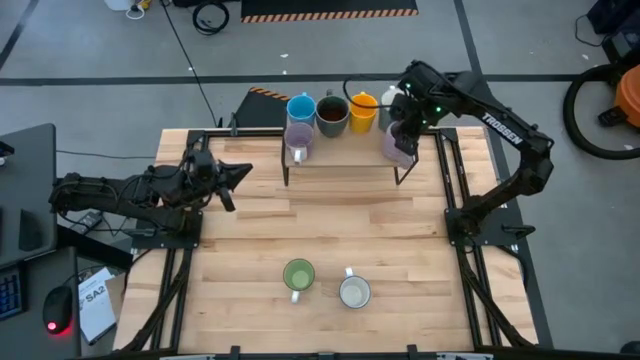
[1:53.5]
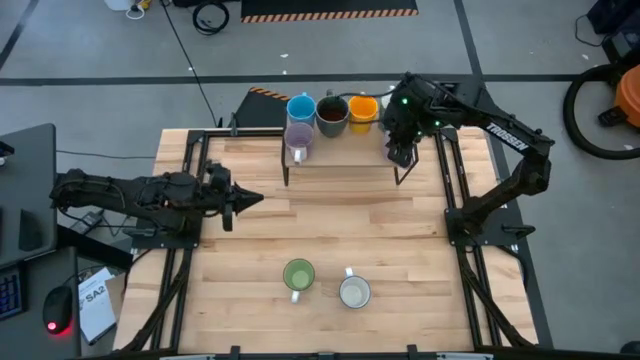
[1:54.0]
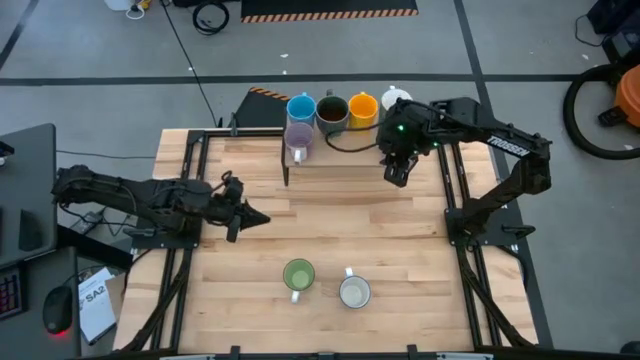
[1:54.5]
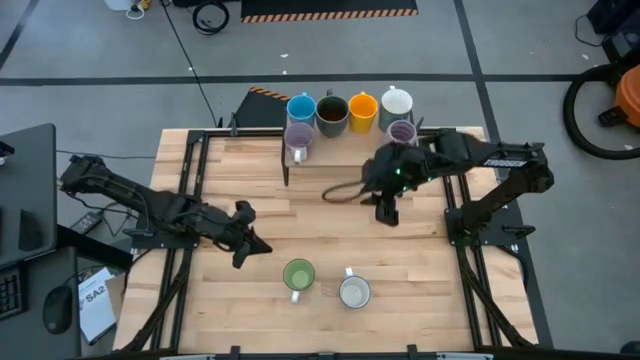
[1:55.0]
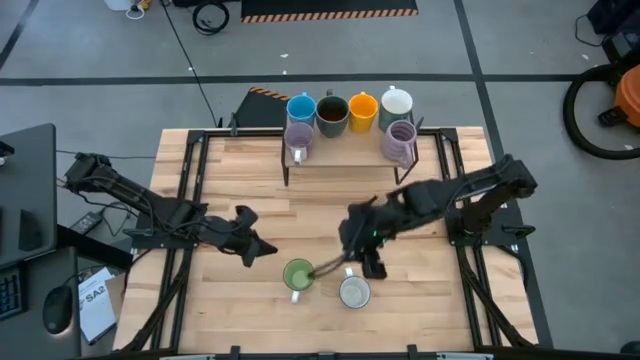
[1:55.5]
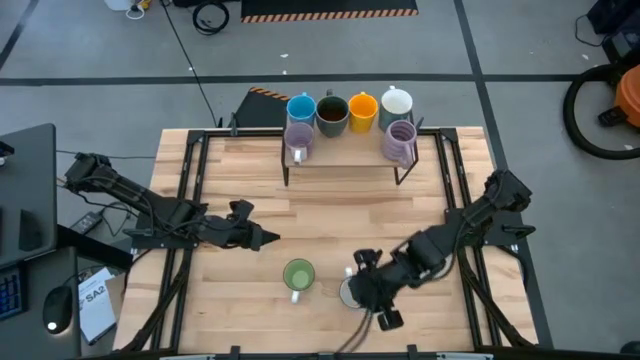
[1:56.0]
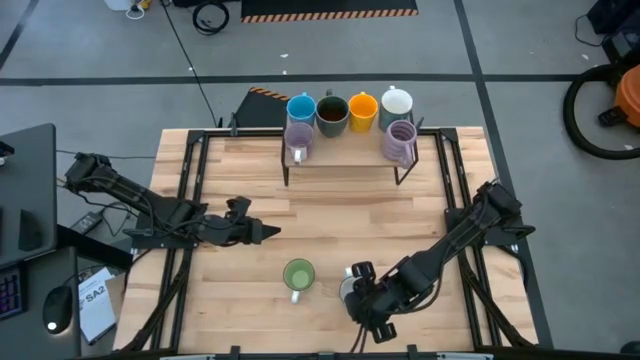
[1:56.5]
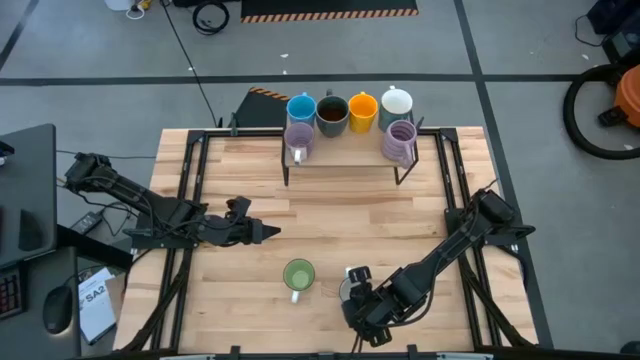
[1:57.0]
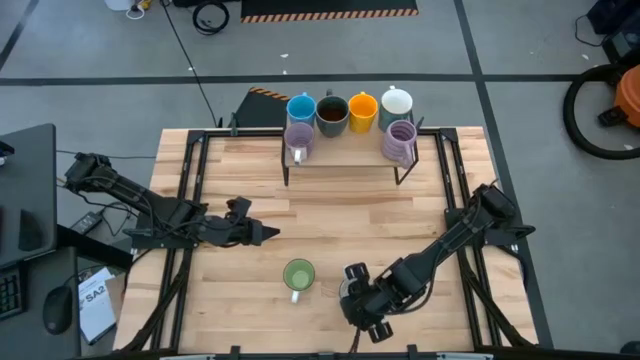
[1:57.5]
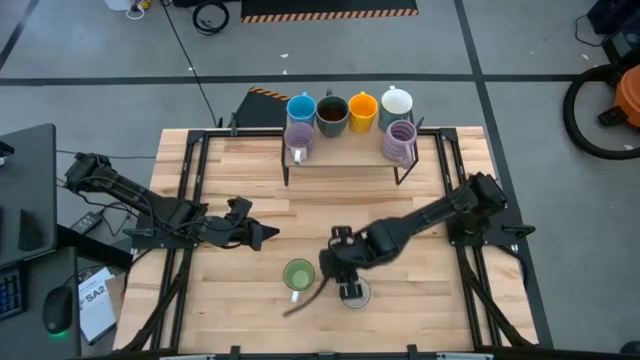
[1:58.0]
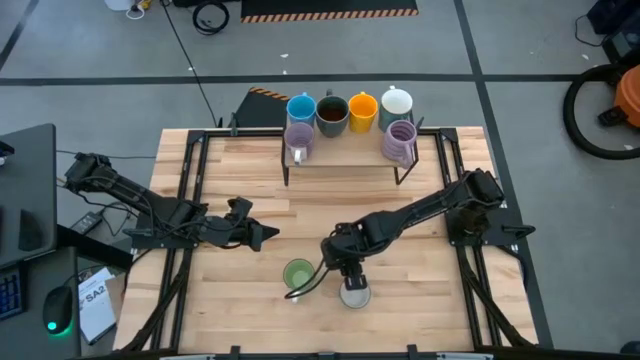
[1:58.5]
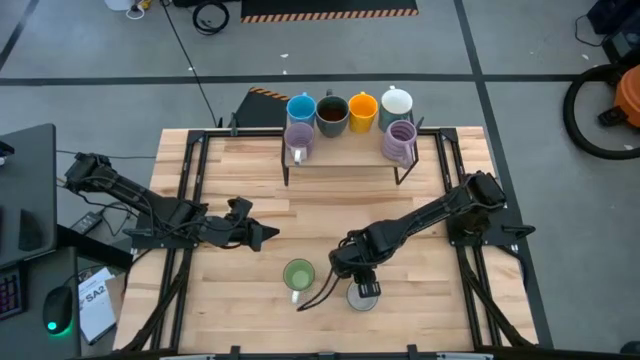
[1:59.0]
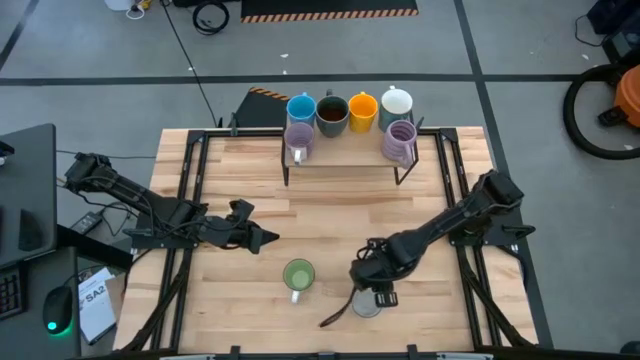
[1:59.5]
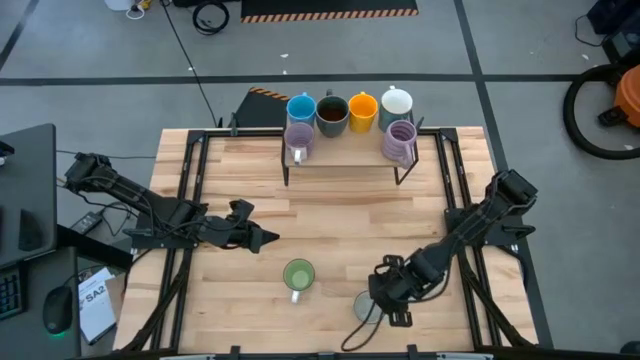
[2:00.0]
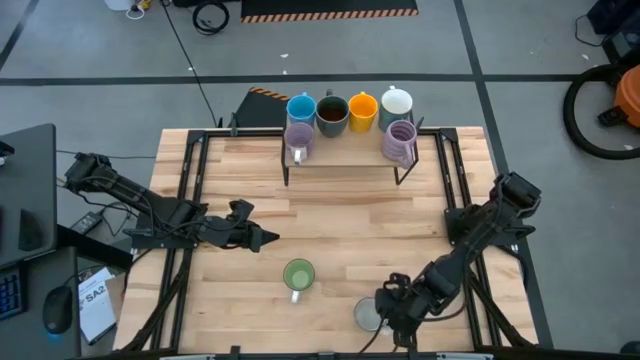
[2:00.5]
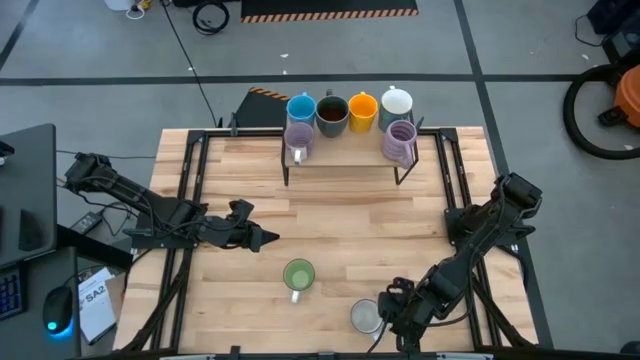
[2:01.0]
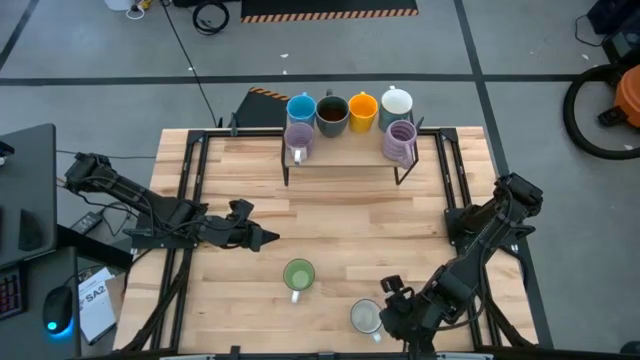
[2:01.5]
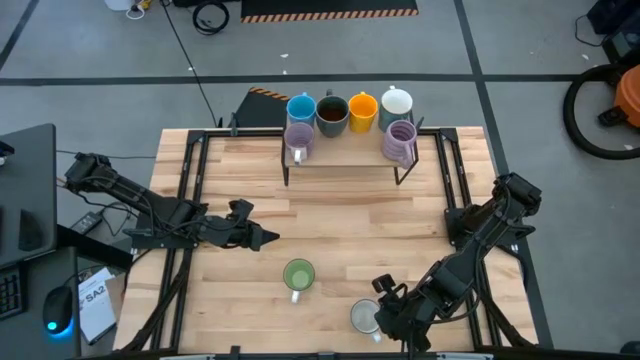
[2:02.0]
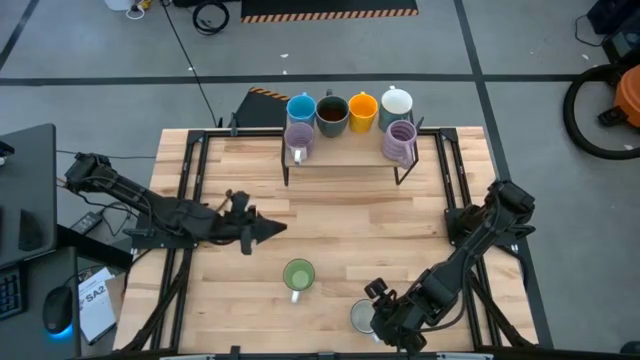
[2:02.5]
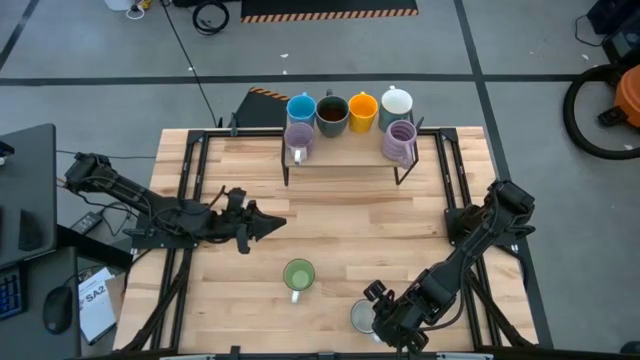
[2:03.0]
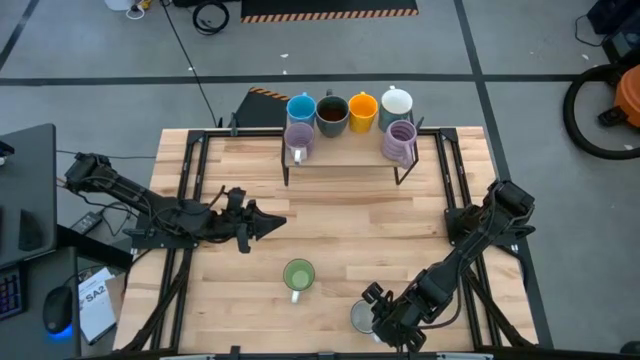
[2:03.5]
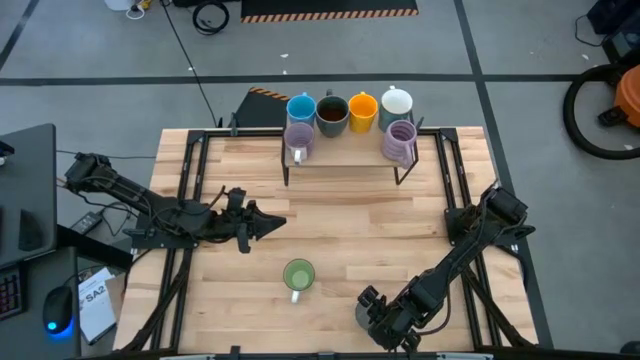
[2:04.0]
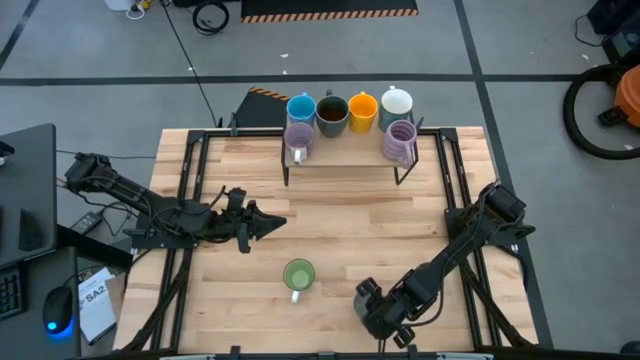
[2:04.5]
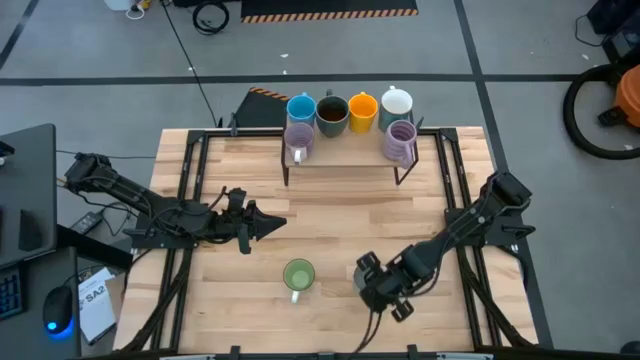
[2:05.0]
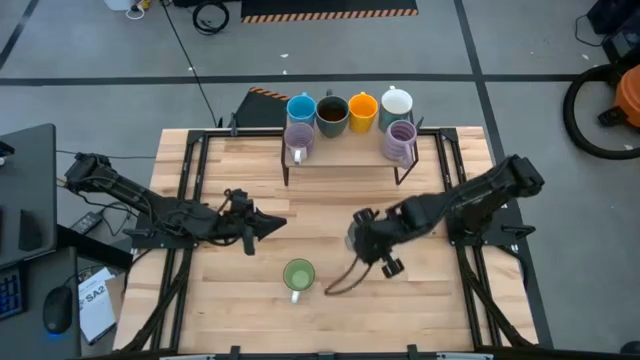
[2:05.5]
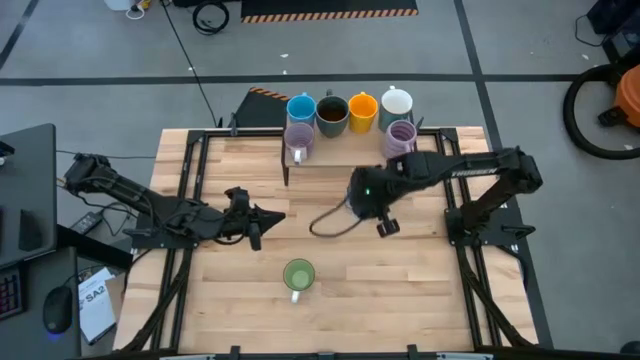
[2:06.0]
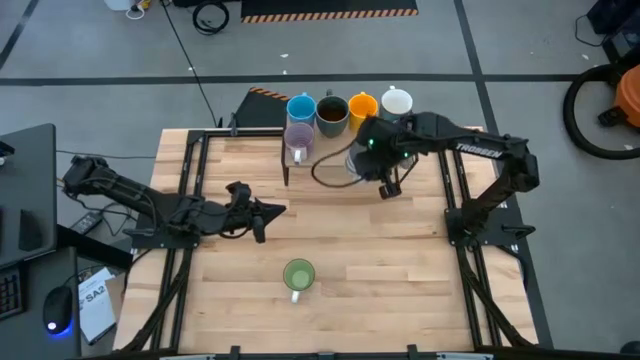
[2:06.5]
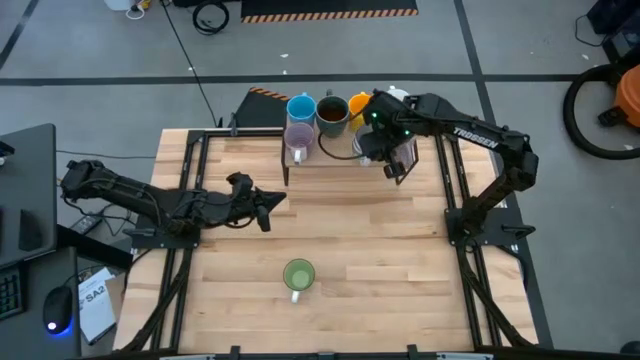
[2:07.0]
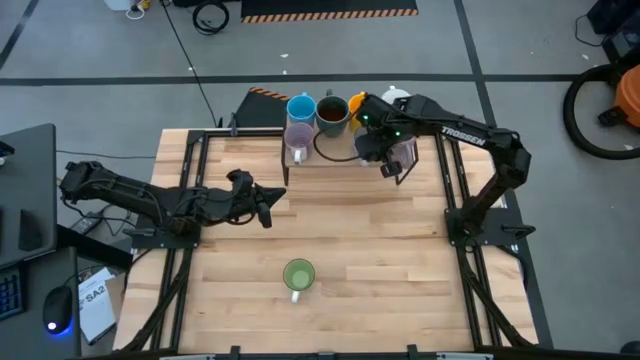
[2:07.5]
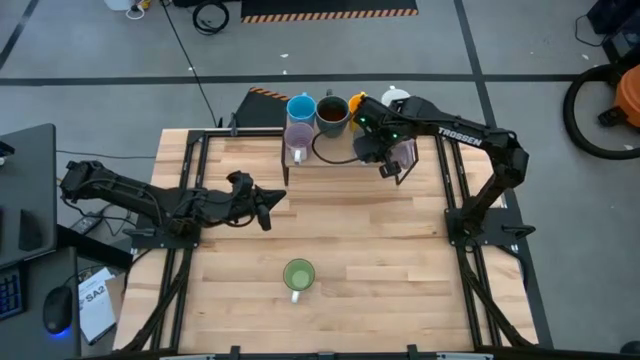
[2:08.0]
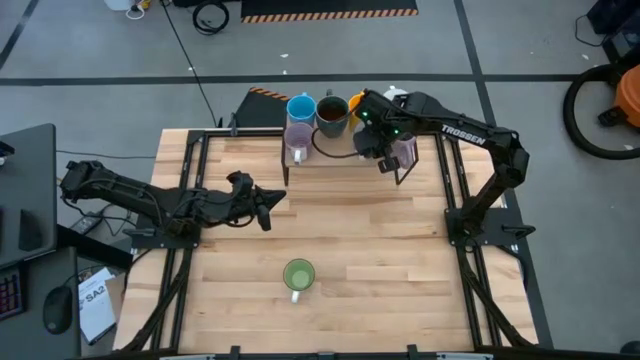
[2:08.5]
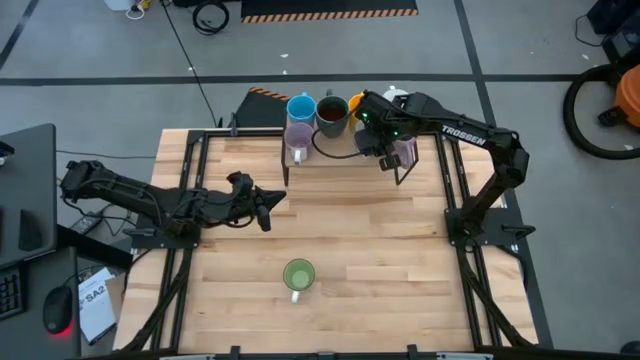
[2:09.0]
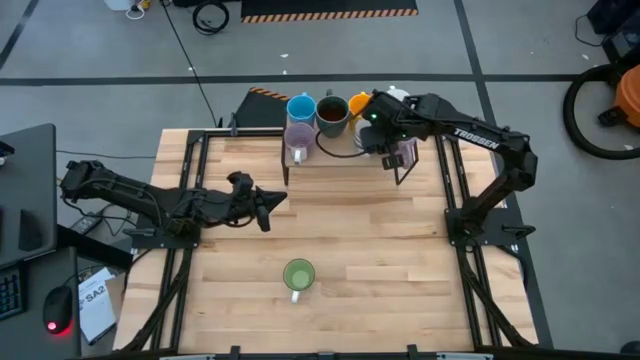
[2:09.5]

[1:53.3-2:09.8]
Task: Place coffee mugs
Put the white mug on the shelf

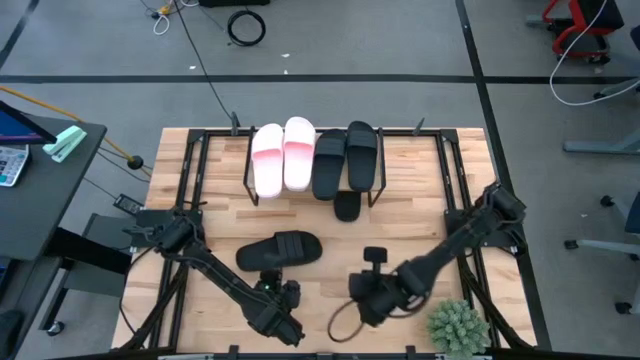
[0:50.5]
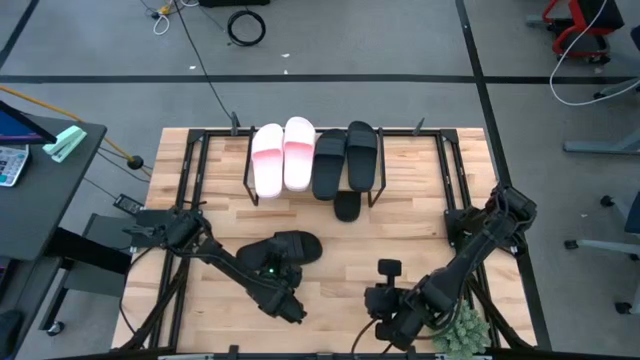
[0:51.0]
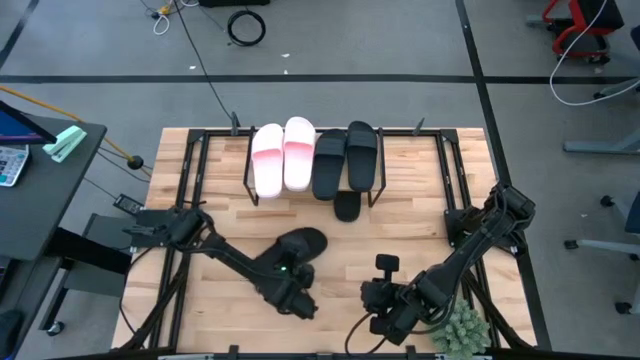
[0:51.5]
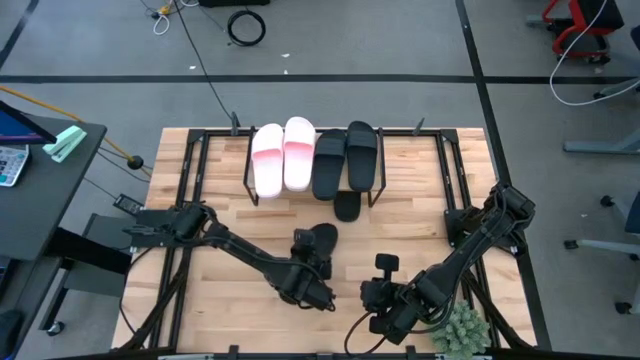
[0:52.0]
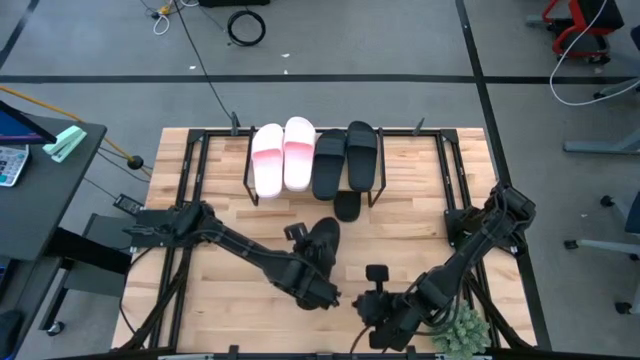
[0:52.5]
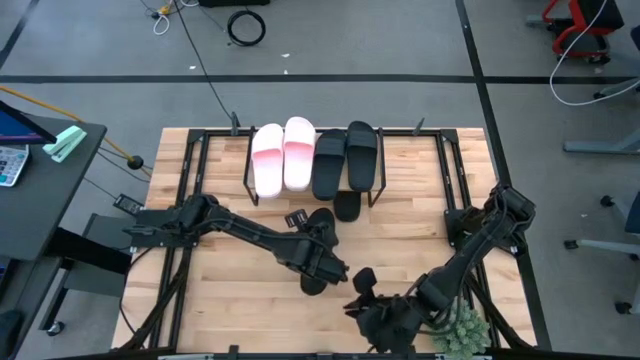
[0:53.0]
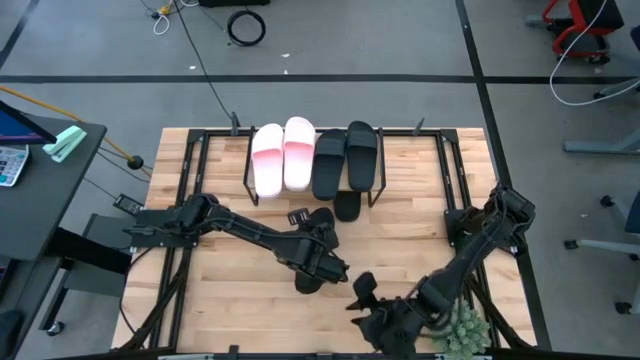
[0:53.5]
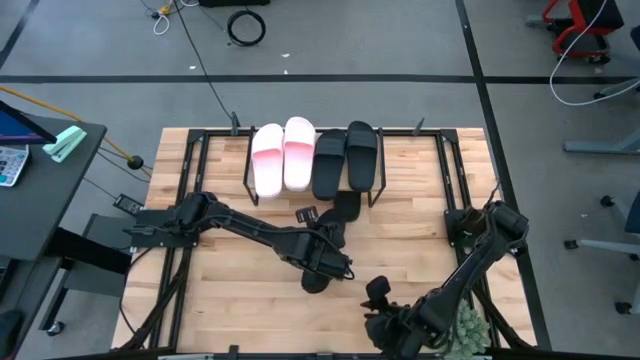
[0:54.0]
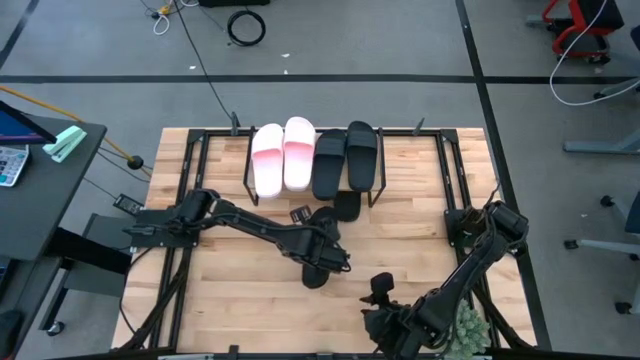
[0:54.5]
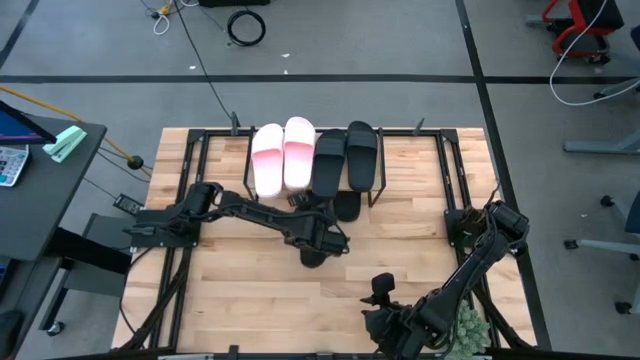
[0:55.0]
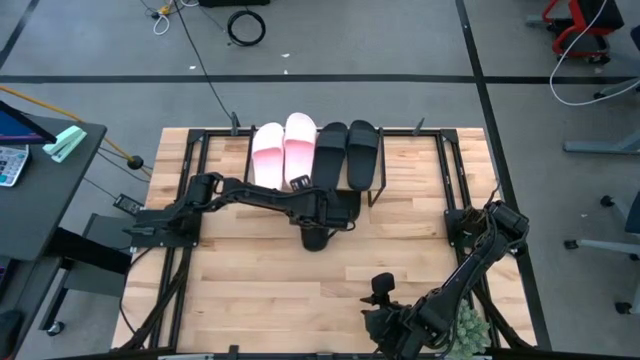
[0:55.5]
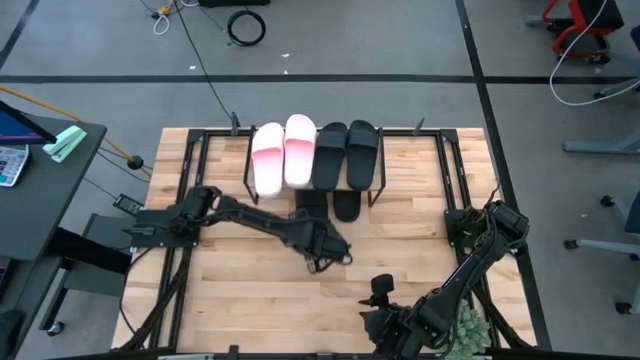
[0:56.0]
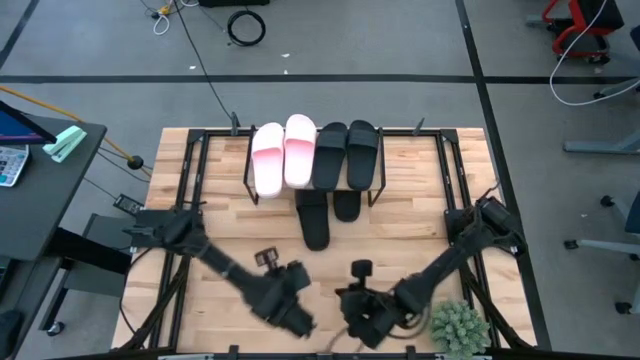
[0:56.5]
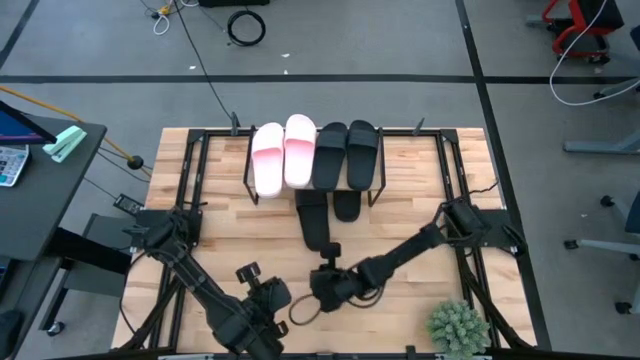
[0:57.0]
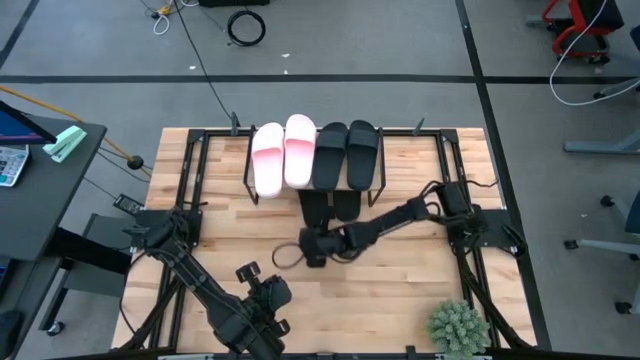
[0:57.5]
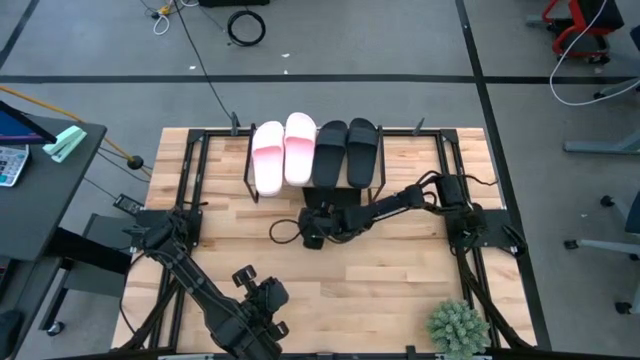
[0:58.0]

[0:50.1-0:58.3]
Task: Pick and place slides into the shelf
Move the black slipper under the shelf
